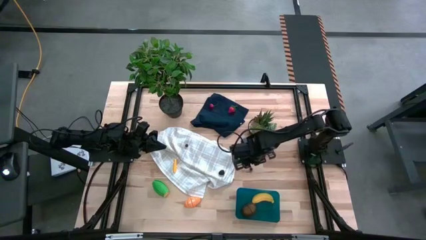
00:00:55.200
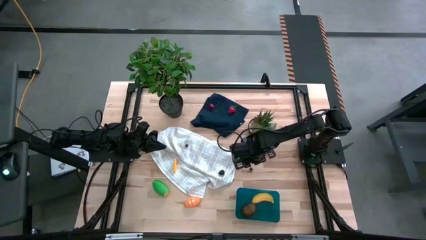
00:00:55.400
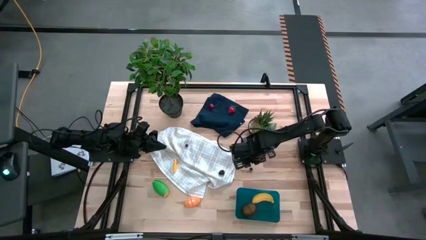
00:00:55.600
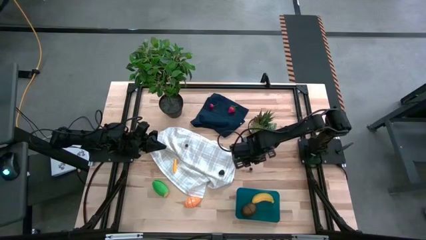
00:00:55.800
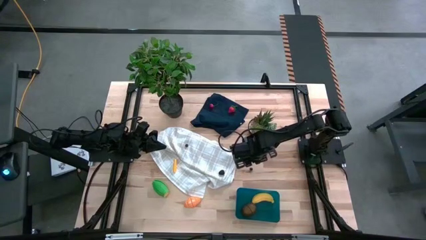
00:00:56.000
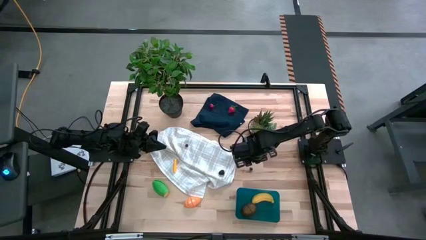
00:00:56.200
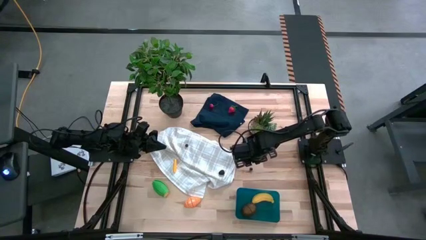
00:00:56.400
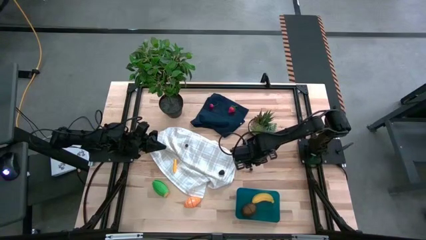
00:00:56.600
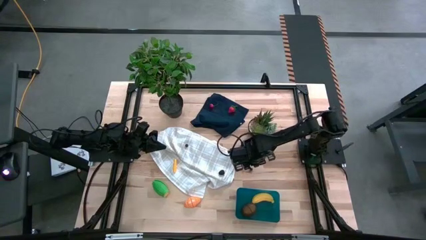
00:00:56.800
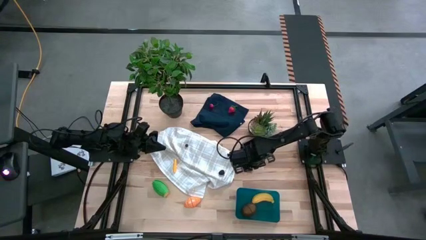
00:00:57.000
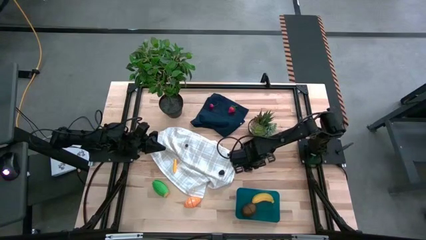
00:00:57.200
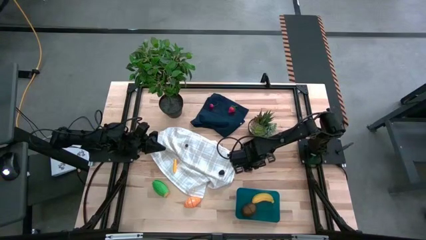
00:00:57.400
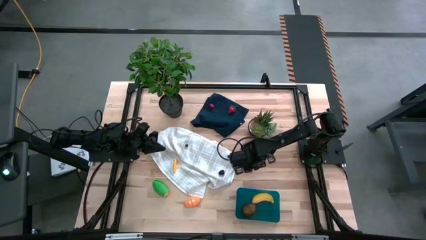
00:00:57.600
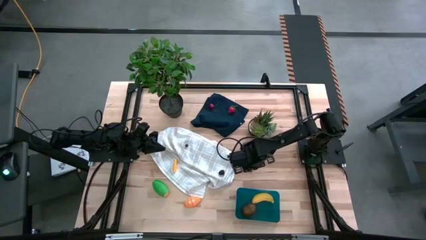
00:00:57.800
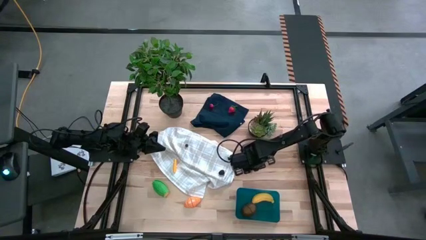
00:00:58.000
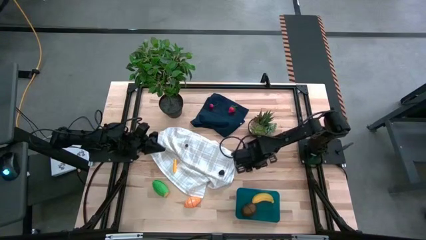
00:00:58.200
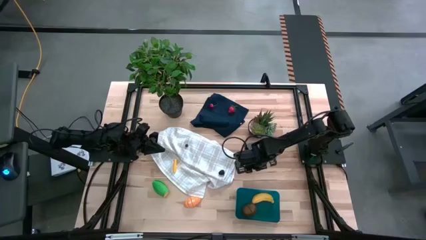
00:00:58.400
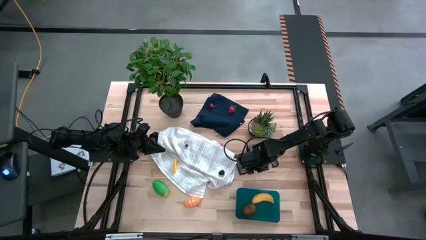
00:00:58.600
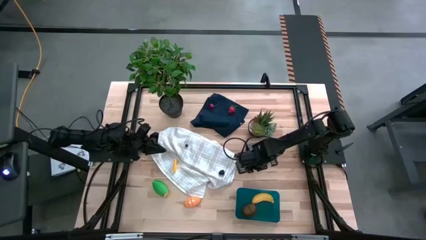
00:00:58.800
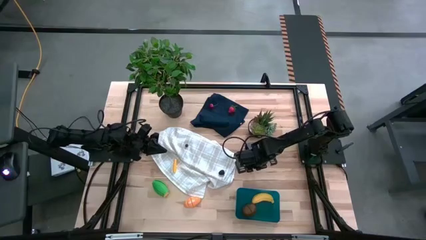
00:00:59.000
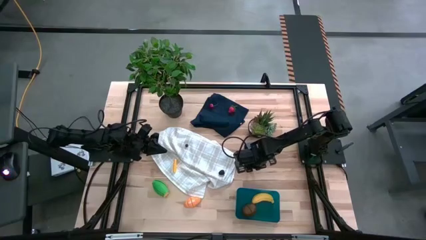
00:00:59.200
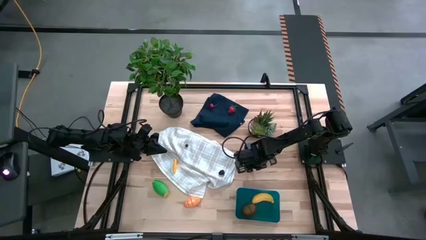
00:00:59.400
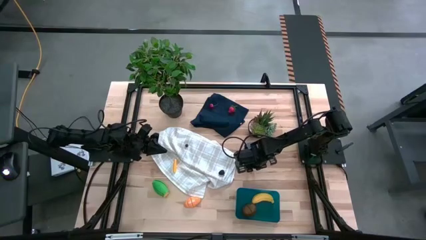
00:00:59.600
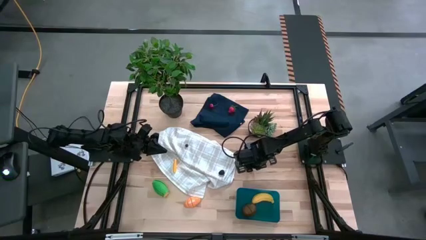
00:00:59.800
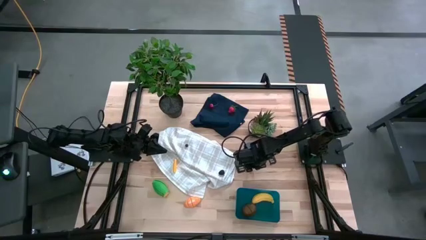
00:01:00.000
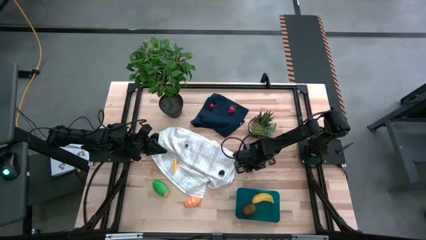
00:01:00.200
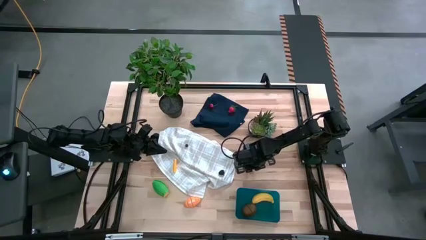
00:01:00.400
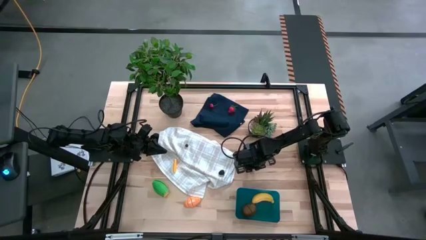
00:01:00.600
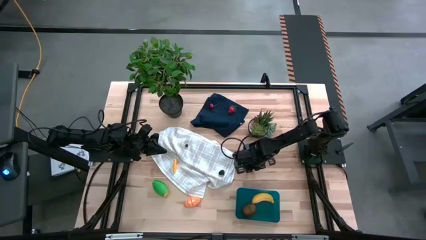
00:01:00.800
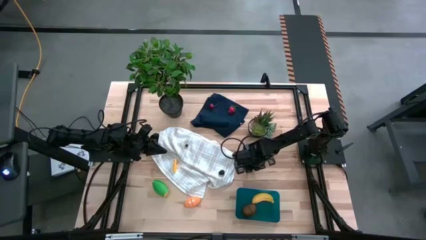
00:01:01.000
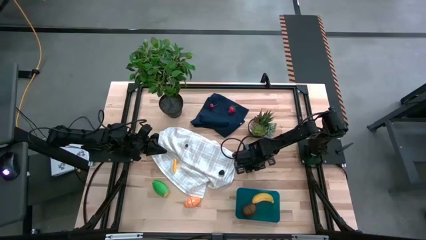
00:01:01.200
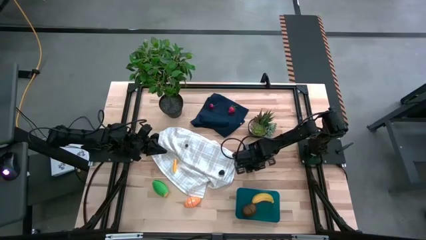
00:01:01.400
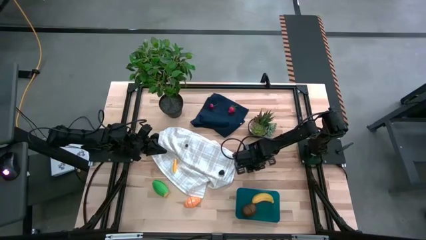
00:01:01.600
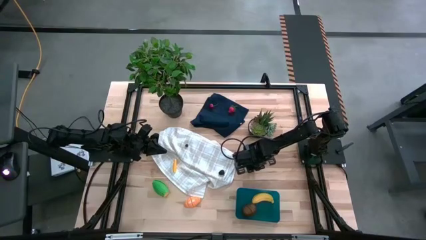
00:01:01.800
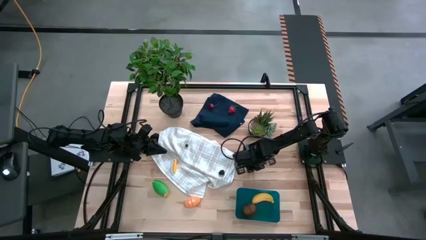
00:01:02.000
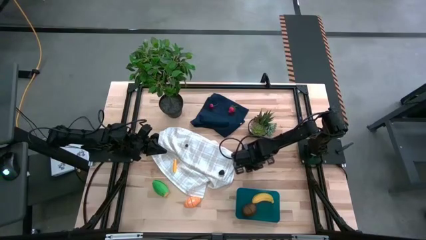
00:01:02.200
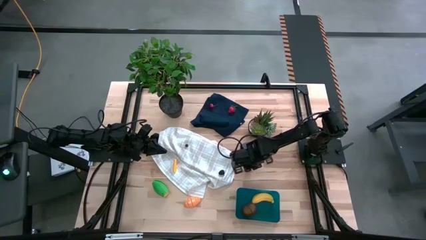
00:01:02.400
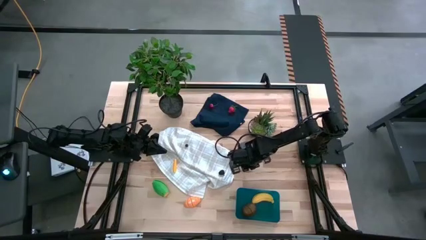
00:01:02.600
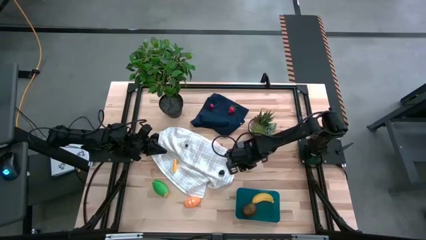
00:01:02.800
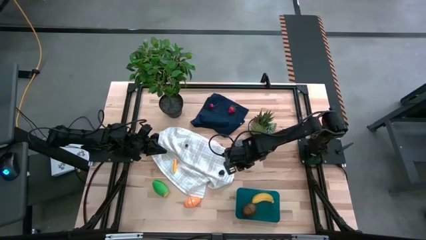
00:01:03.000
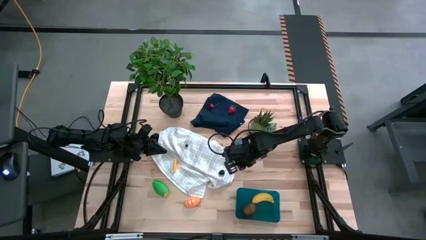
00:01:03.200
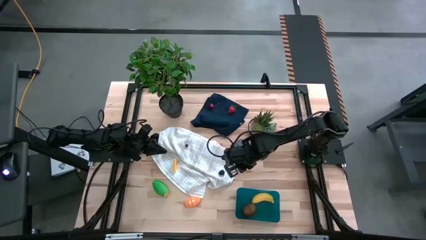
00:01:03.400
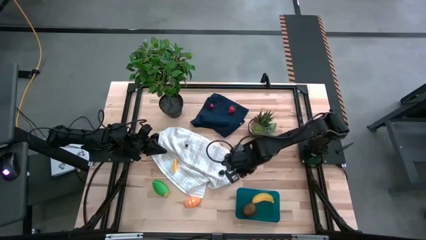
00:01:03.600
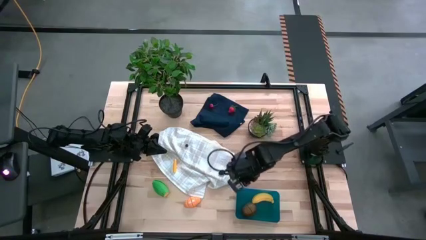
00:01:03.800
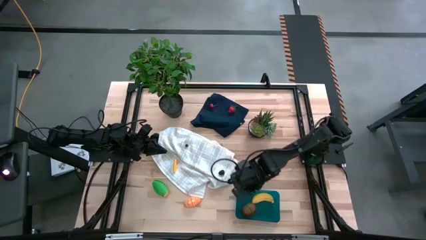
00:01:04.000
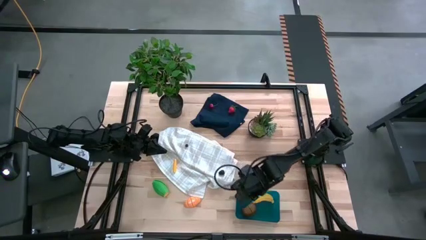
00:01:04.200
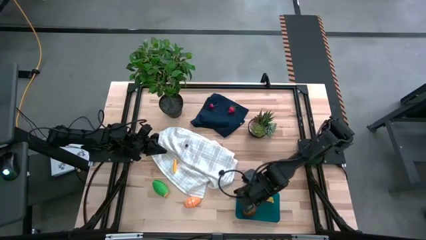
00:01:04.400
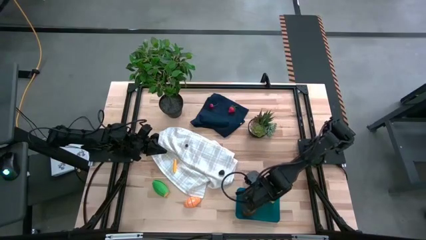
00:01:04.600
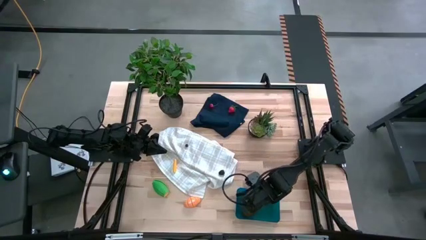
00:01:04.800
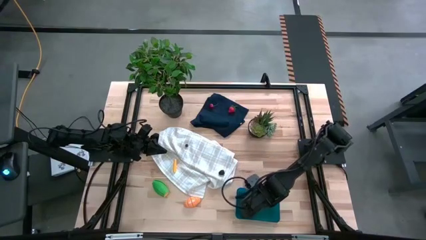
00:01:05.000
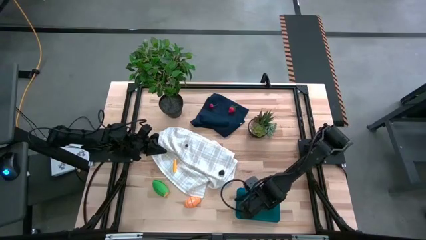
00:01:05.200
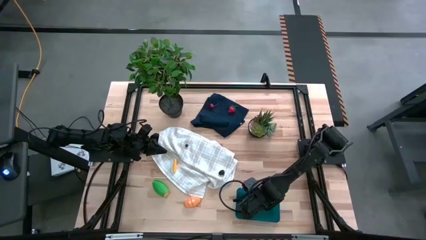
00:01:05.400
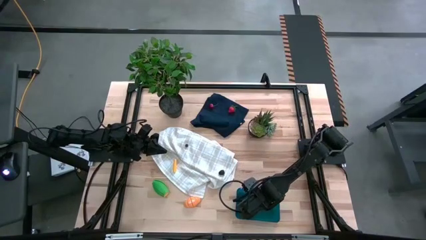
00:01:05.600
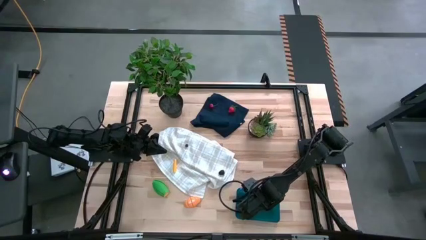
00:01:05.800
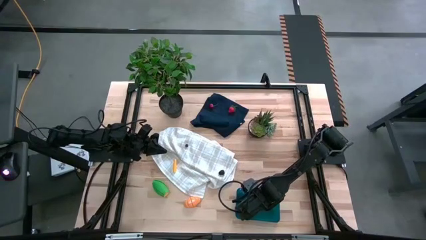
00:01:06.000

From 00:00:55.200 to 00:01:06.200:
Task: Pick and placing Produce into tupperware
Put the right blueberry into the bin

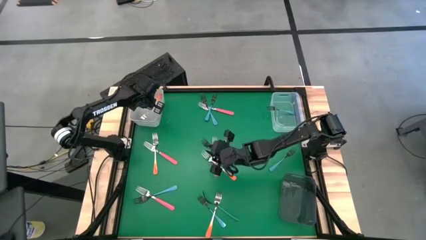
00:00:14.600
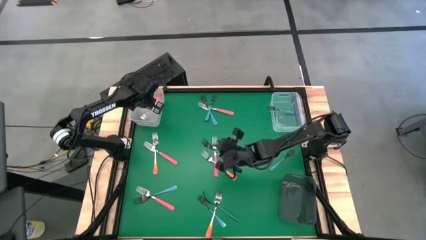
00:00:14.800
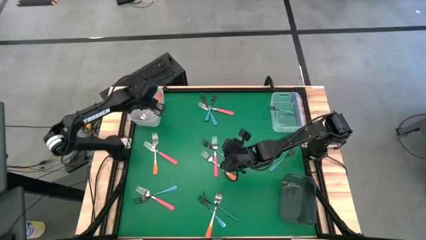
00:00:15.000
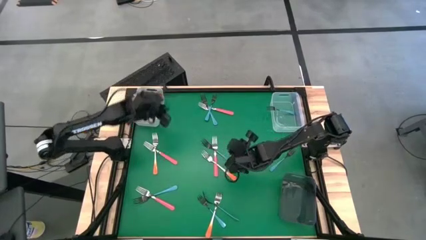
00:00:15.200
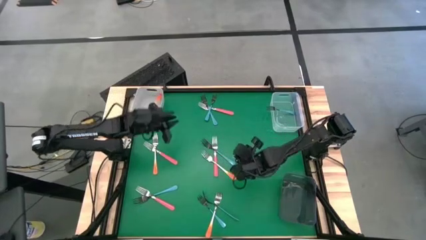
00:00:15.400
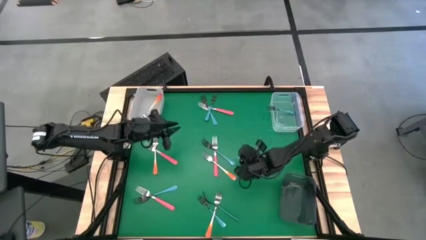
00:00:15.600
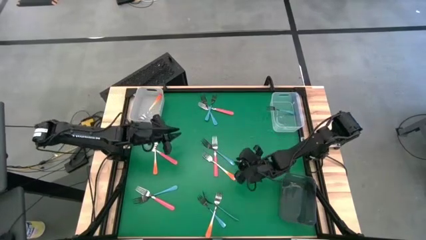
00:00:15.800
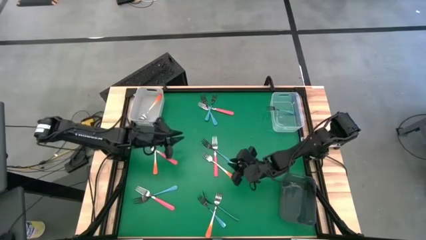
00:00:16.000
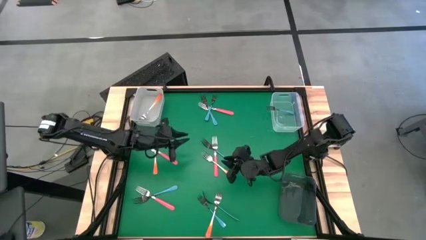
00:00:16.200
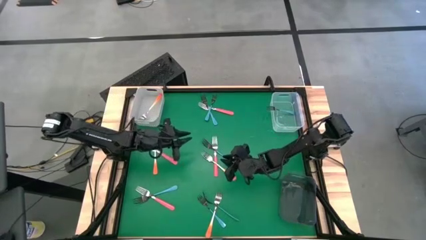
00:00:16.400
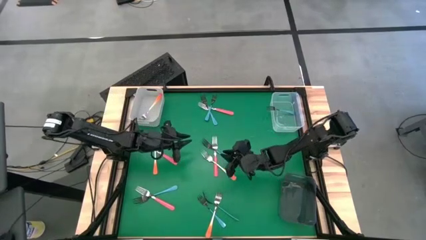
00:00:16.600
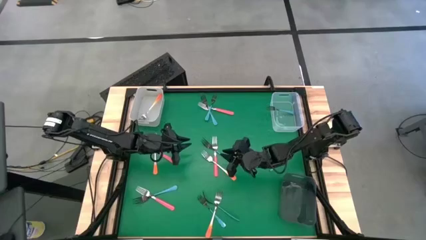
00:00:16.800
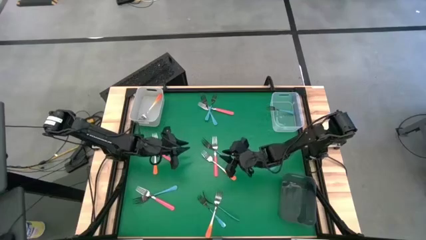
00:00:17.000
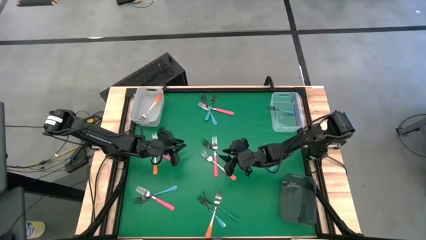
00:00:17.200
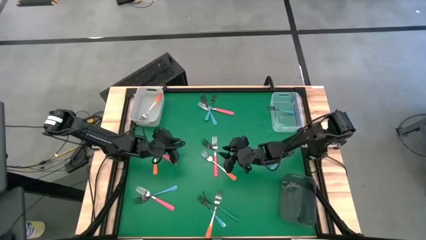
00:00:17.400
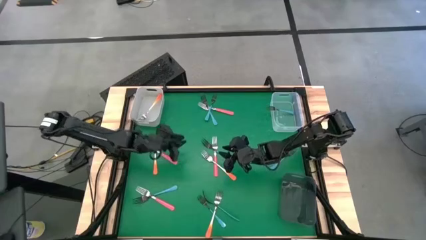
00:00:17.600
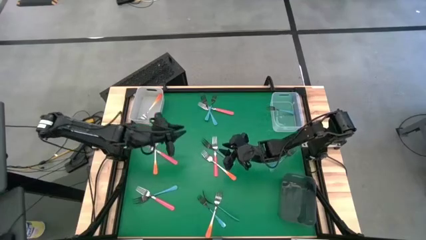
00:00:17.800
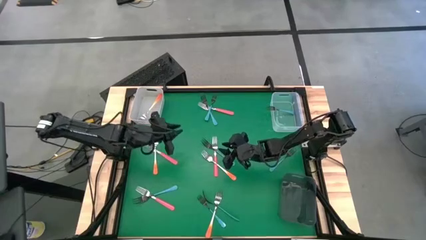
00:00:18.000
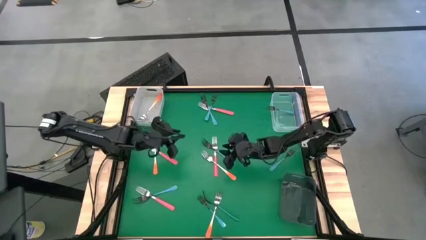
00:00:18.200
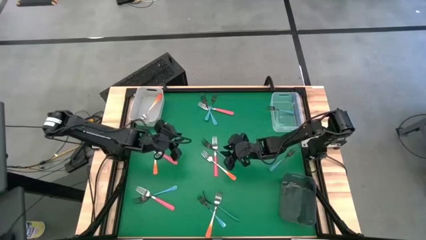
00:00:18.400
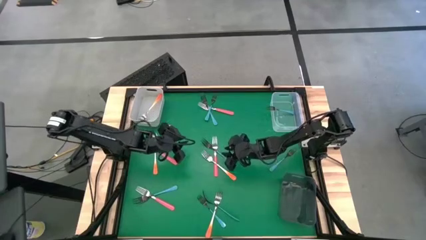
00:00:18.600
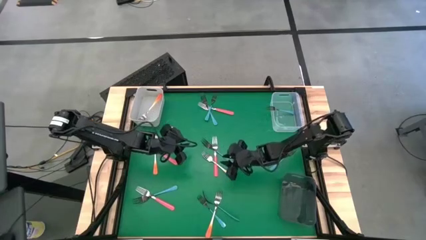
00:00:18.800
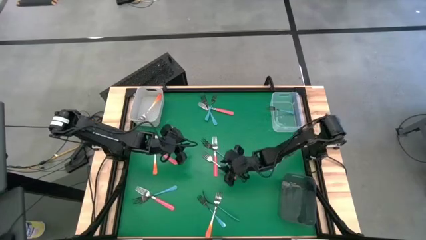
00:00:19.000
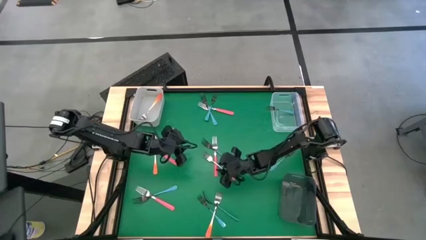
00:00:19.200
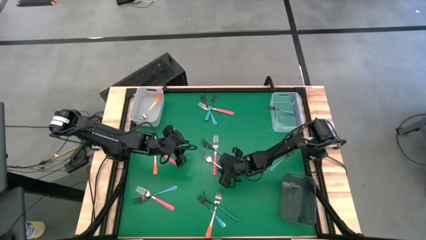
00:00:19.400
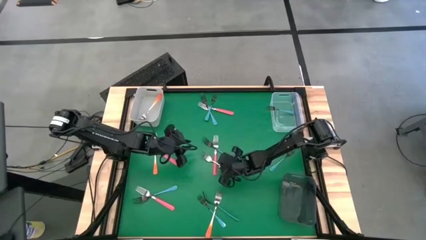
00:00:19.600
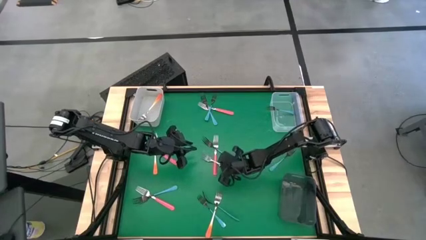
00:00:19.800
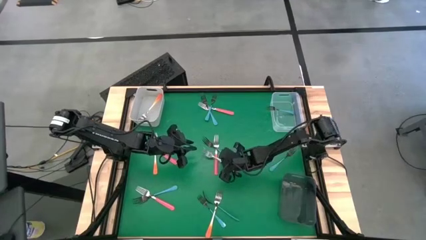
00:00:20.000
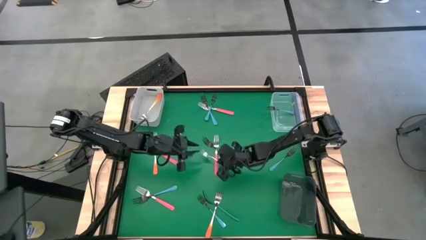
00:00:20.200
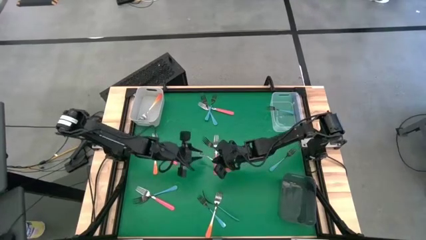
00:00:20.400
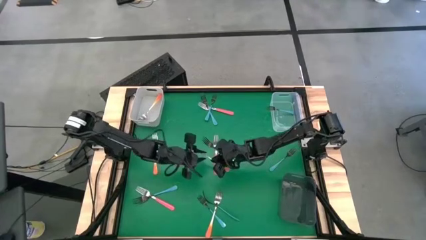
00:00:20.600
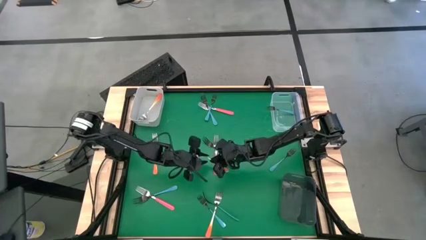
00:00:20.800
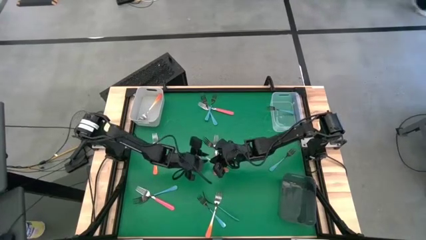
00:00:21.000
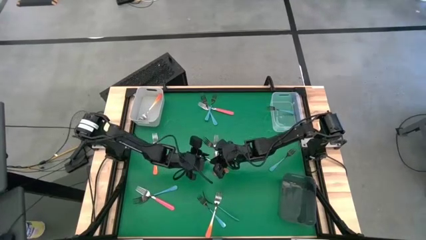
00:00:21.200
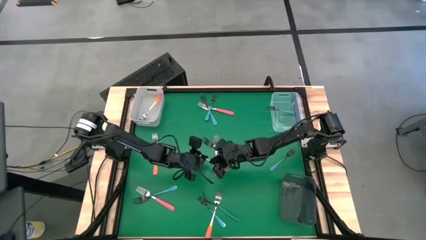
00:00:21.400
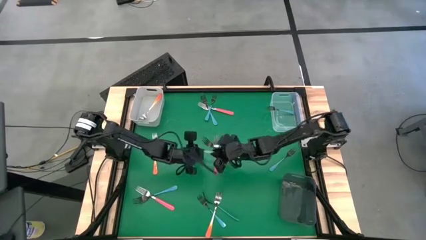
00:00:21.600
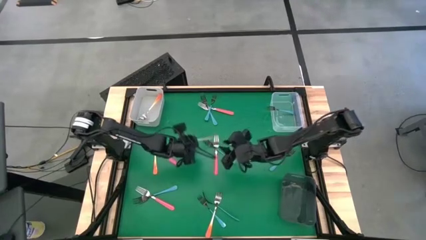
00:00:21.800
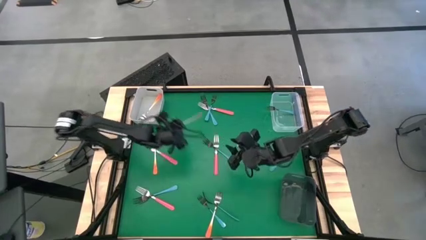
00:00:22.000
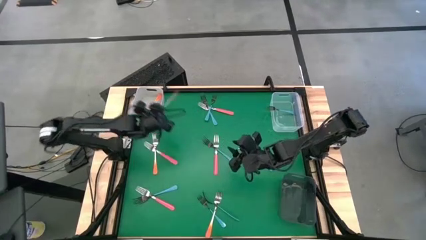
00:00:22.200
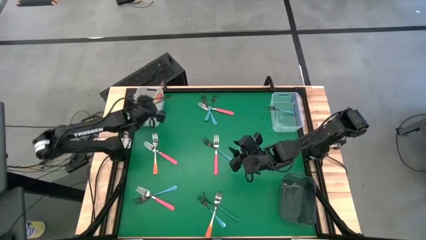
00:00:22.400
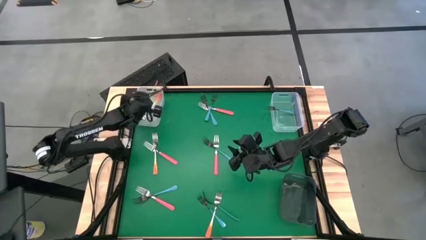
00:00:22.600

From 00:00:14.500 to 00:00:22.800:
Task: Sort silverware by color (type)
Put the orange fork into the white bin
